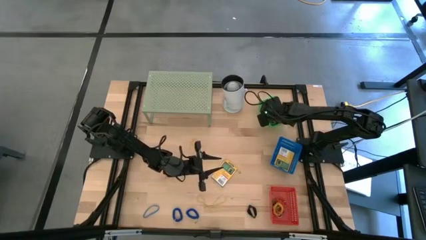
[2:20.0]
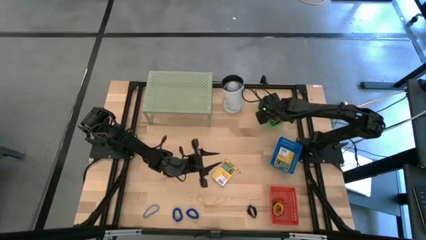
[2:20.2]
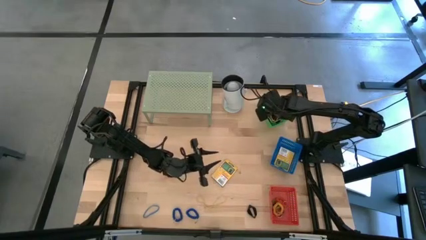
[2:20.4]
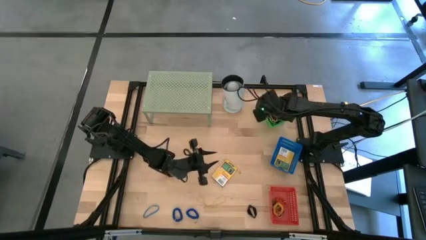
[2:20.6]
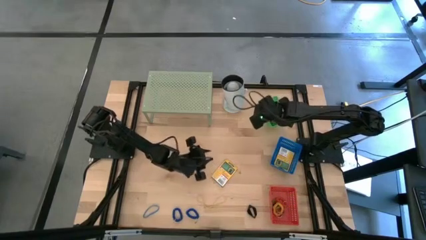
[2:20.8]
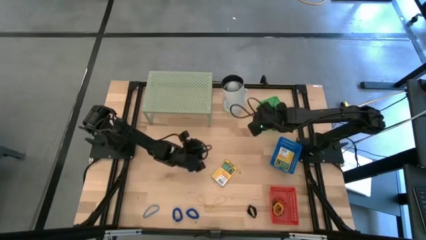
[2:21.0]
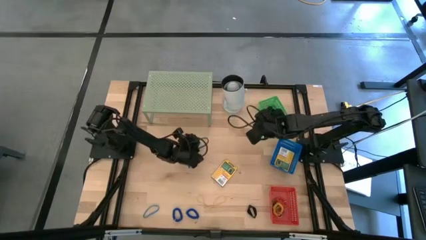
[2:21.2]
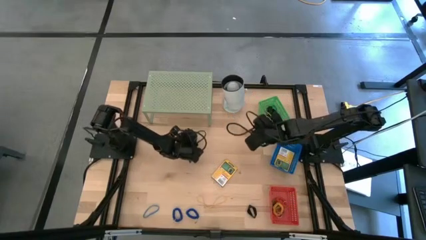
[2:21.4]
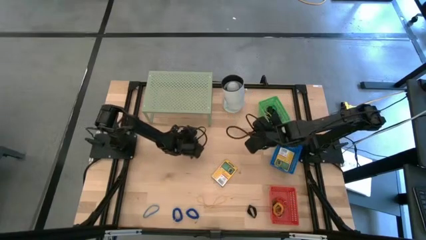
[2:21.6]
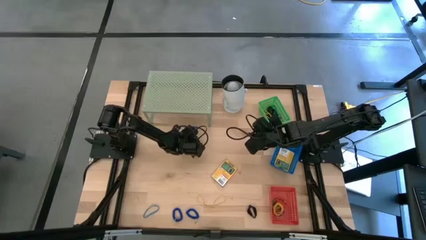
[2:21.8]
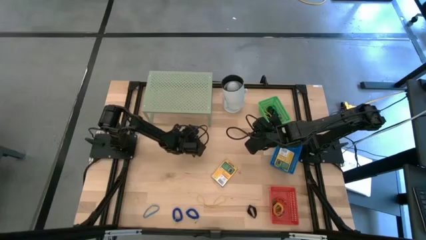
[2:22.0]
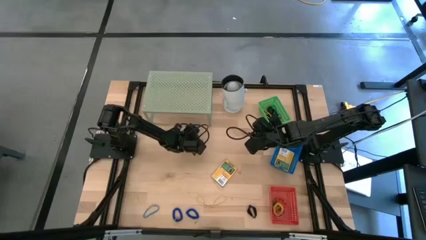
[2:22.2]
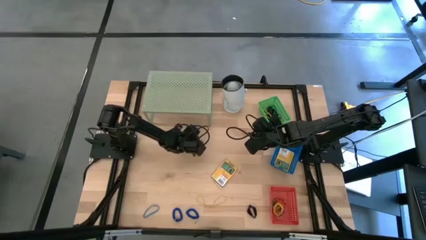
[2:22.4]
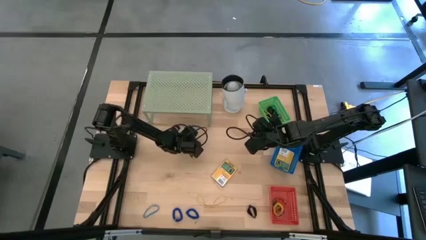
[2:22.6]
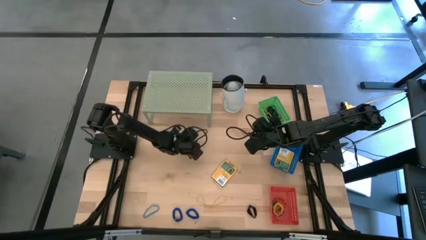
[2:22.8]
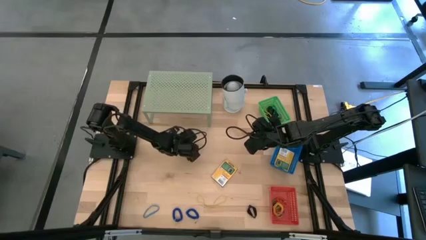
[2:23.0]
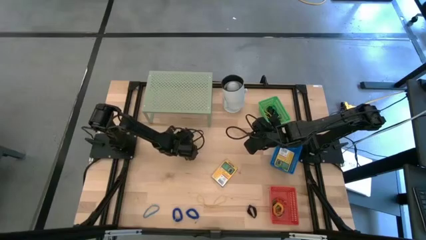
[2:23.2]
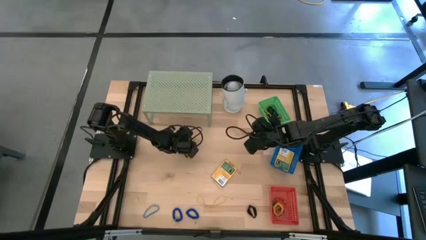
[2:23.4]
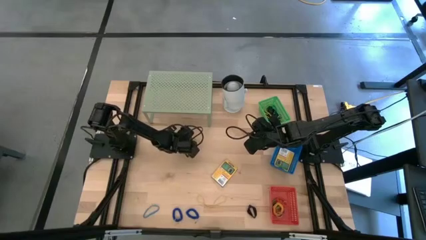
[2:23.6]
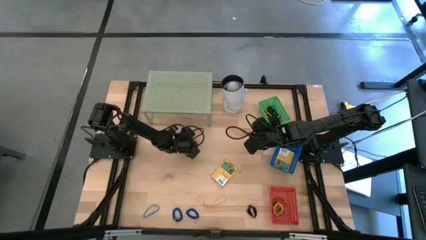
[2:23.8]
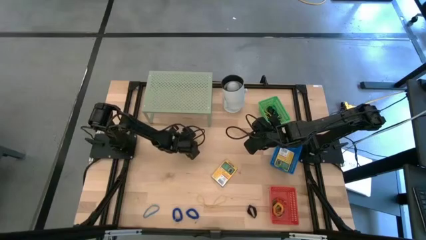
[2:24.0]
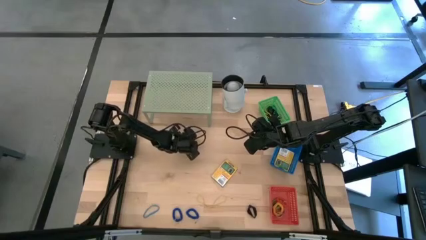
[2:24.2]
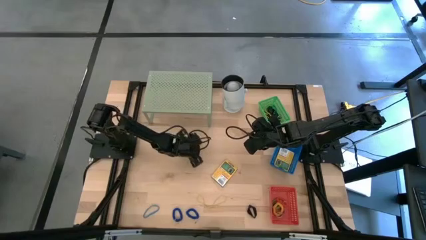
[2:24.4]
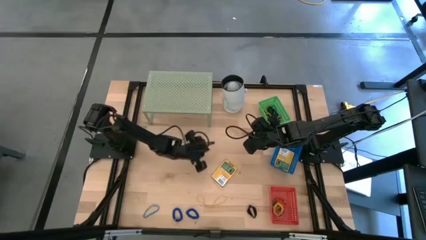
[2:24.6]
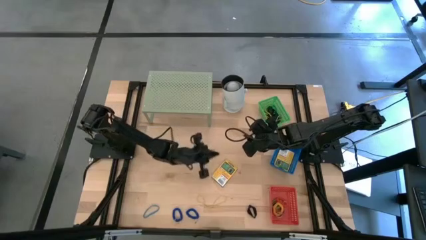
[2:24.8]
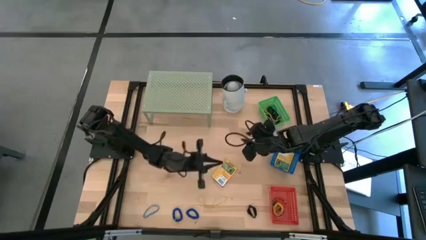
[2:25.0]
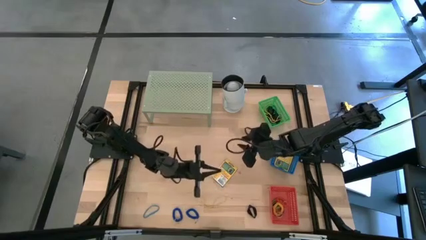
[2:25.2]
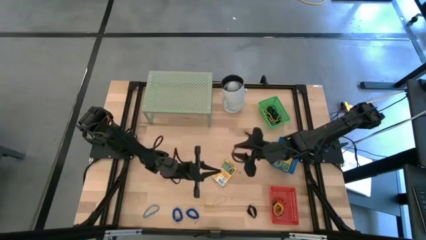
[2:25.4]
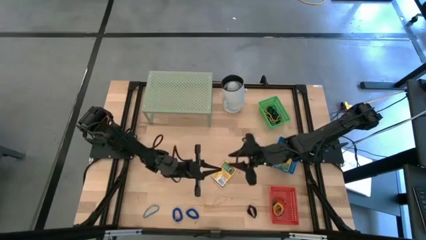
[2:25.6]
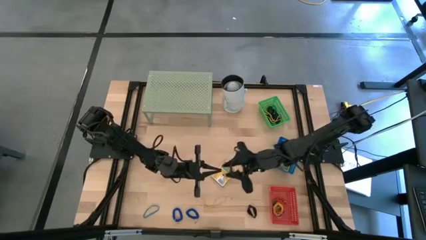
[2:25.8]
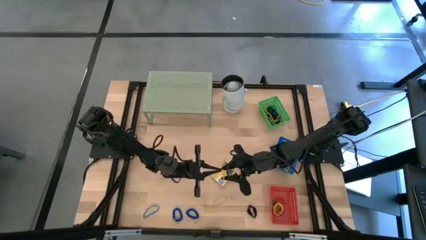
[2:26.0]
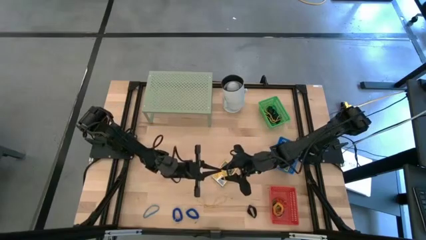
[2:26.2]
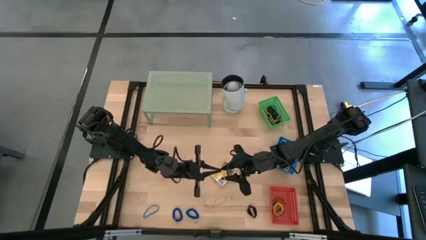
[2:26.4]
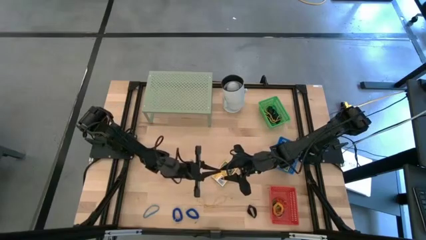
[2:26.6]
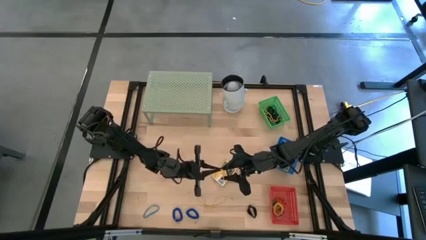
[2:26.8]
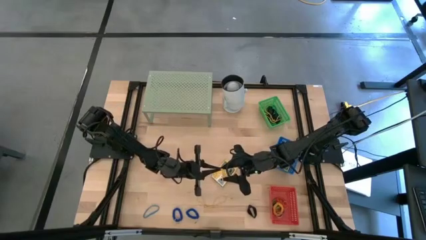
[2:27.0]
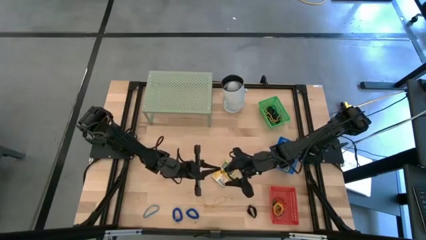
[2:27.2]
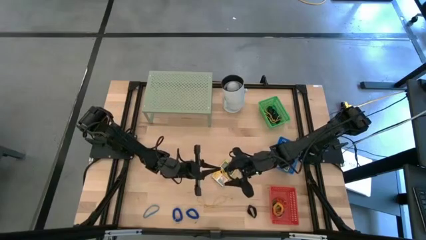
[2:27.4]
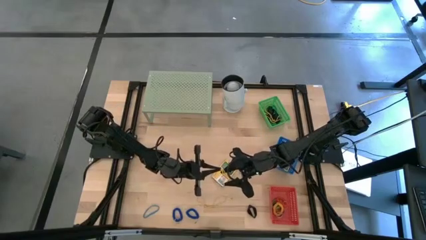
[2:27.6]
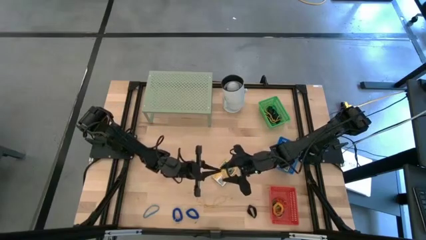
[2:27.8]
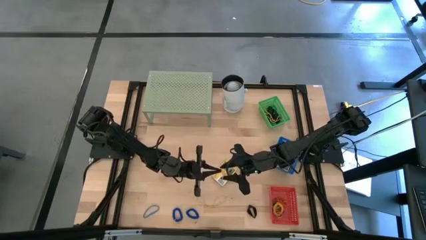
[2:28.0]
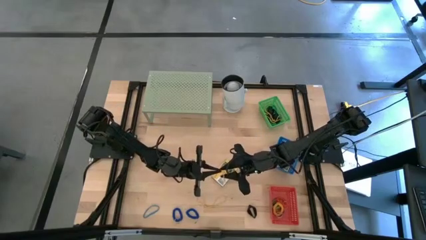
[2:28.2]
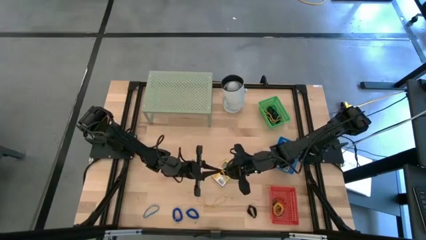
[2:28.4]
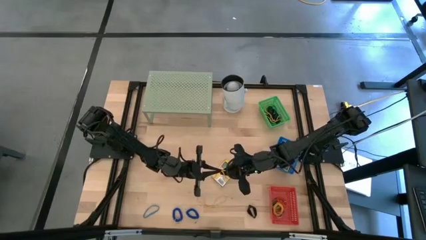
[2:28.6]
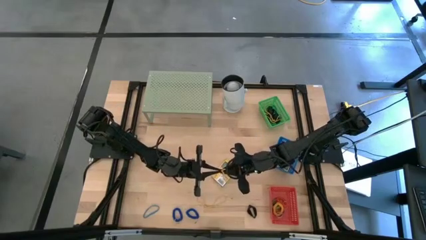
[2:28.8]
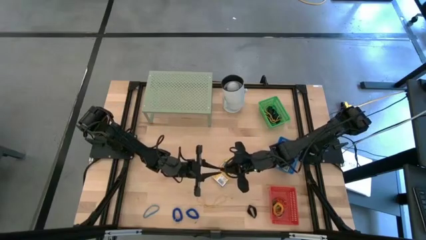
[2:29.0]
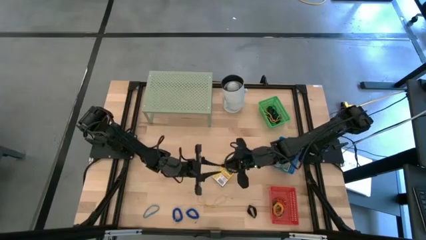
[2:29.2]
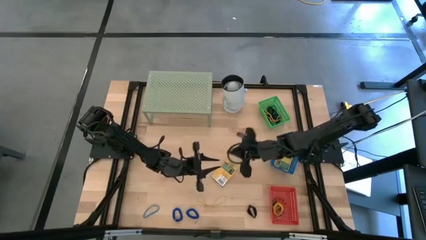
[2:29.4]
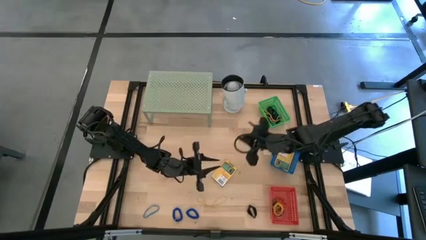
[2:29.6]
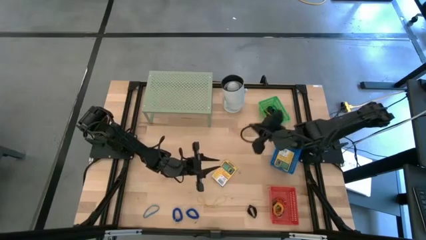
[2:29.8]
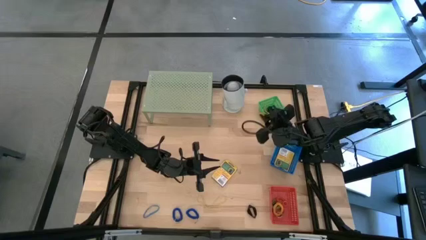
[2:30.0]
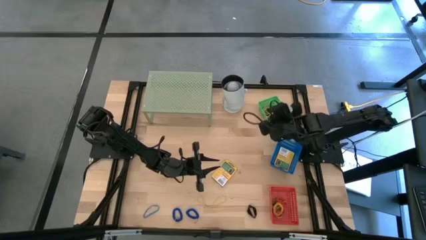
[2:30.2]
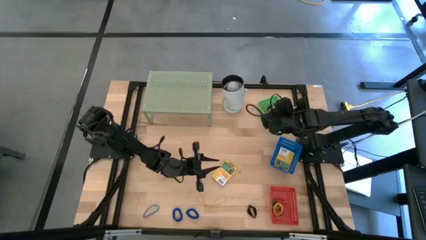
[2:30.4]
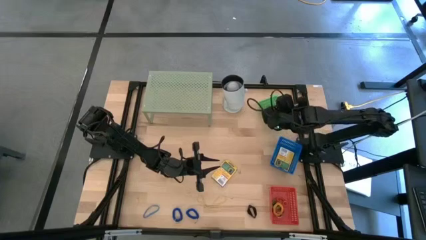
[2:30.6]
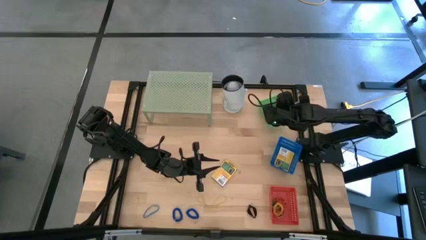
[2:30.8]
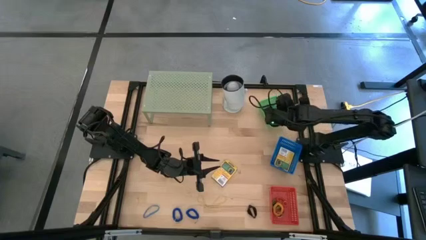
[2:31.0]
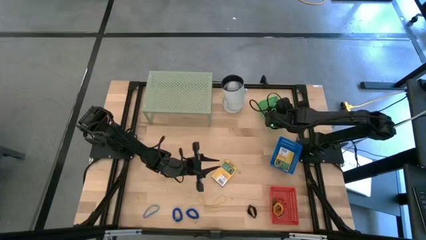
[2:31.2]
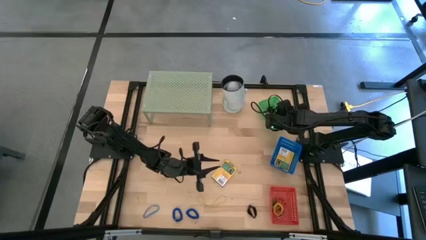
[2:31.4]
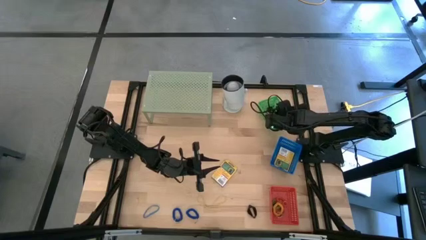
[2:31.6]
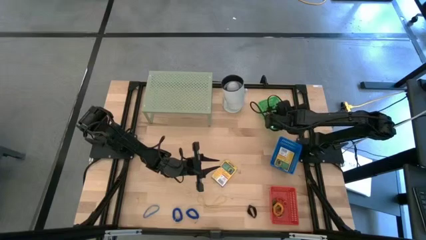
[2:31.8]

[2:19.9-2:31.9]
Task: Pick & Place Office Desk Supplies
Put the yellow rubber band into the green bin

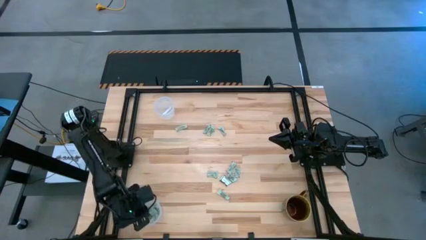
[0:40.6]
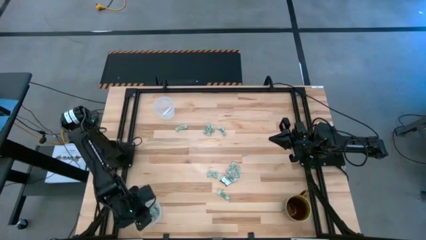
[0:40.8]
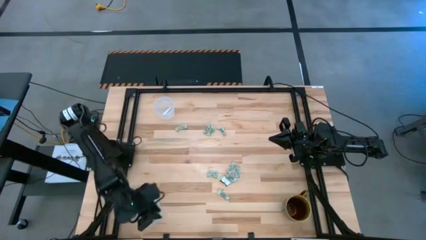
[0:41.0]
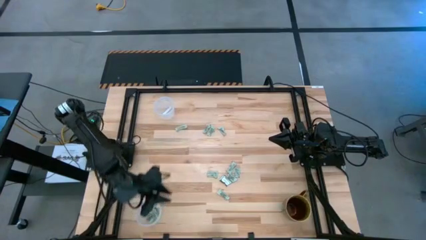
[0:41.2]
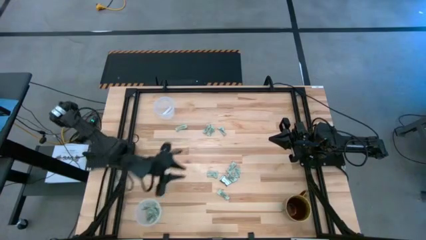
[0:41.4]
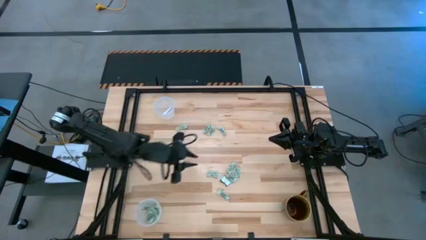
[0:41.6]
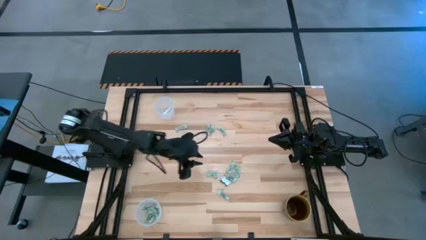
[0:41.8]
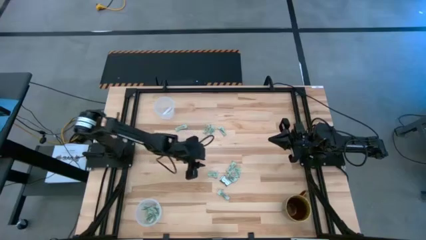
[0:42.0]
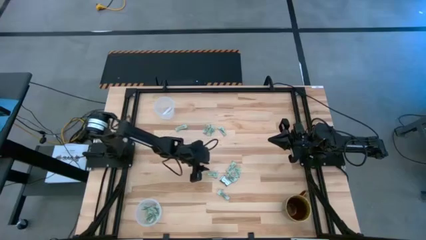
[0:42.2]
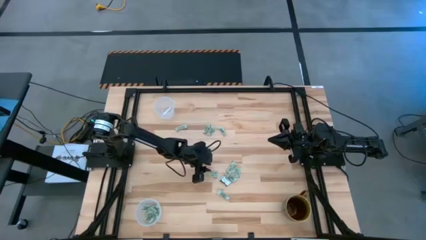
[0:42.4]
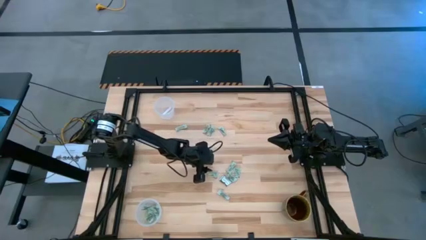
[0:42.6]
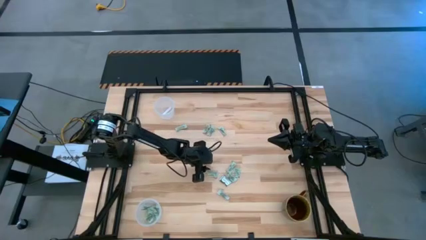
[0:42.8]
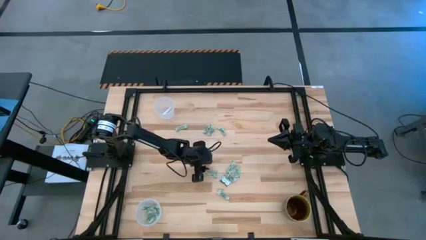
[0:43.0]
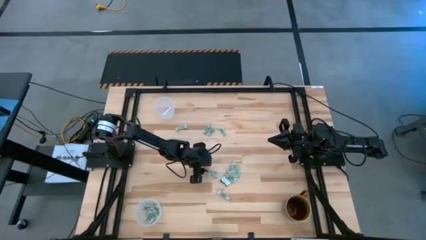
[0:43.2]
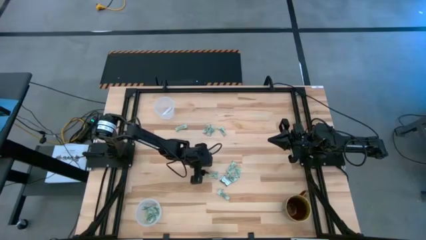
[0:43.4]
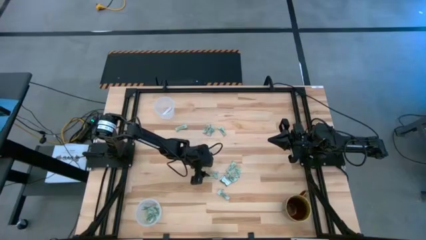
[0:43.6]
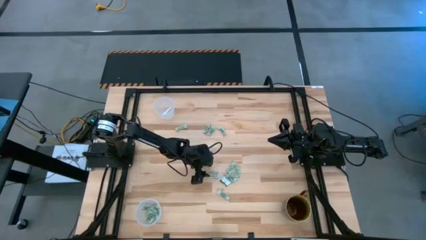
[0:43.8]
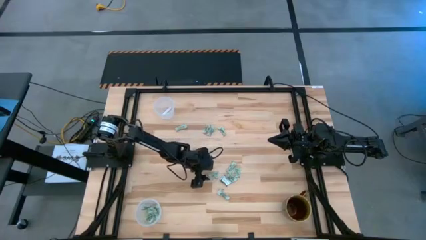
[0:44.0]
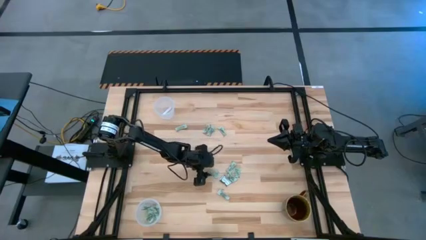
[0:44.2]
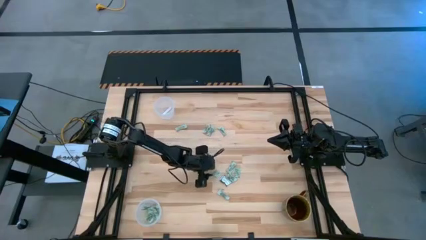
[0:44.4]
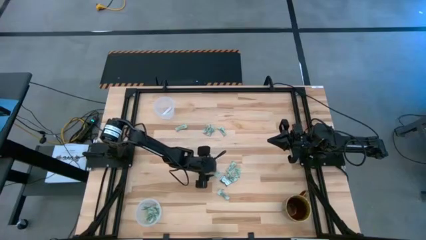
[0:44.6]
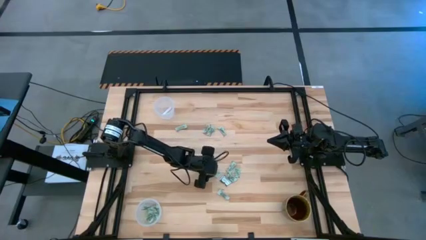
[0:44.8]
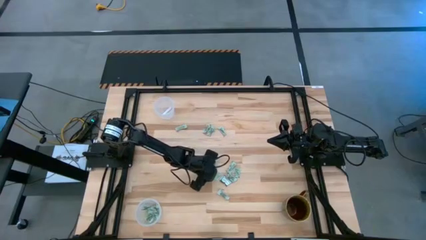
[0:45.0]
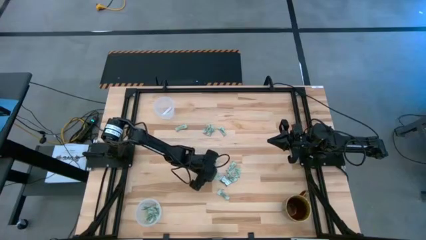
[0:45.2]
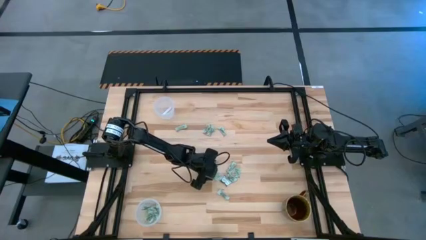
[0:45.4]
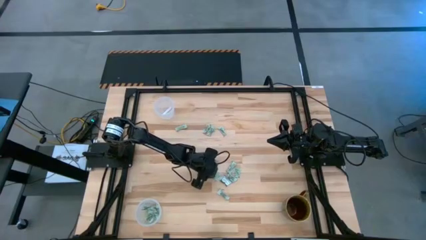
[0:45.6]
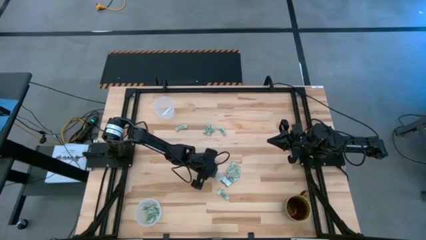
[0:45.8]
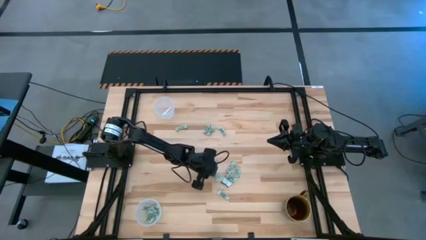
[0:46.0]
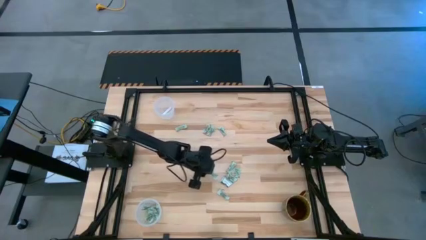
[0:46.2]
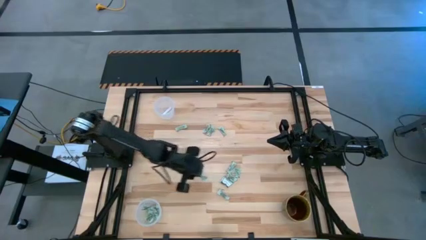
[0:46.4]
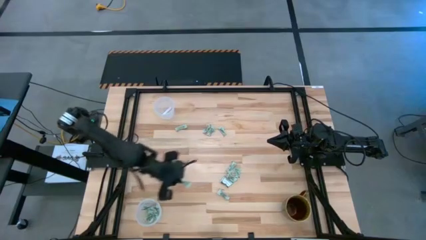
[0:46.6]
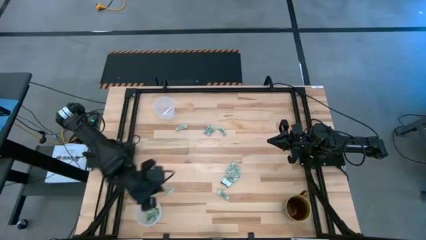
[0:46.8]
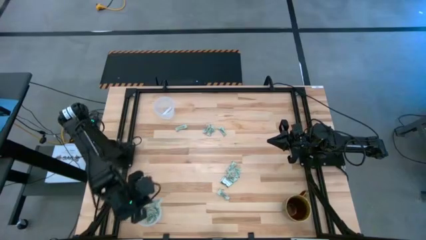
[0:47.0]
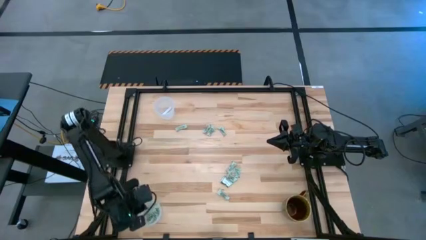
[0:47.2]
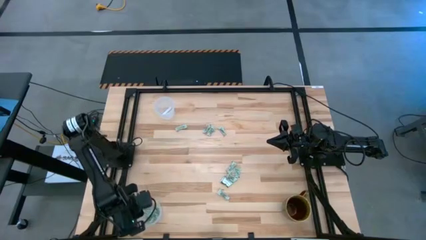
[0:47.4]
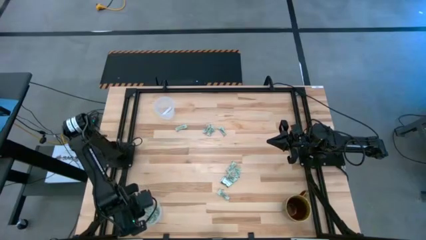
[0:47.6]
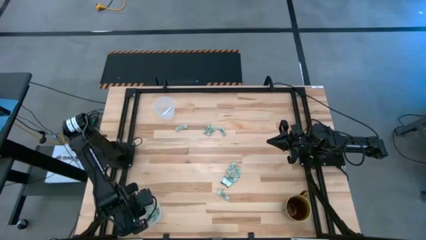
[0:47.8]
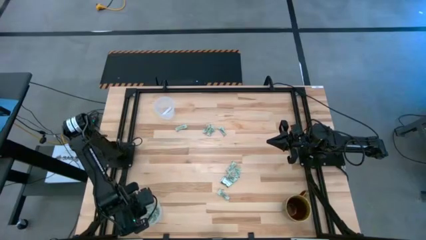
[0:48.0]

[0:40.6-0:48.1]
Task: Pick and place Stevia / Truvia into bins
Put the stevia packet into the bottom transparent container
